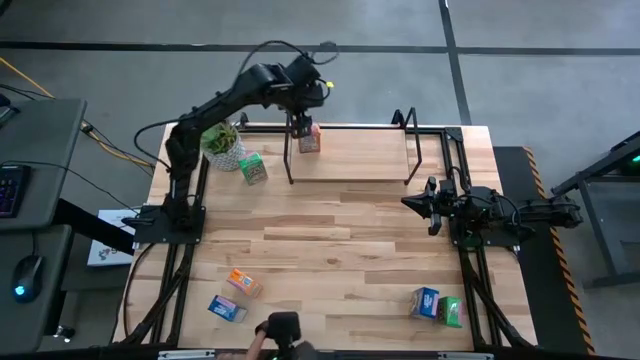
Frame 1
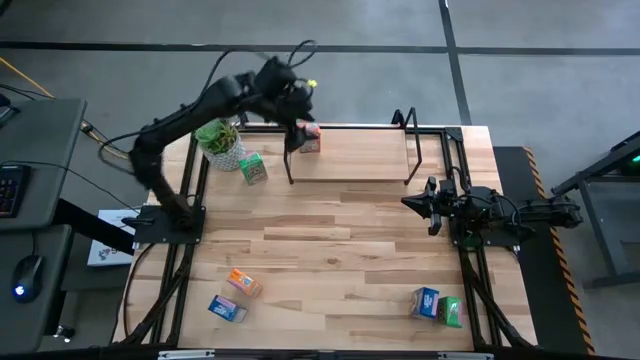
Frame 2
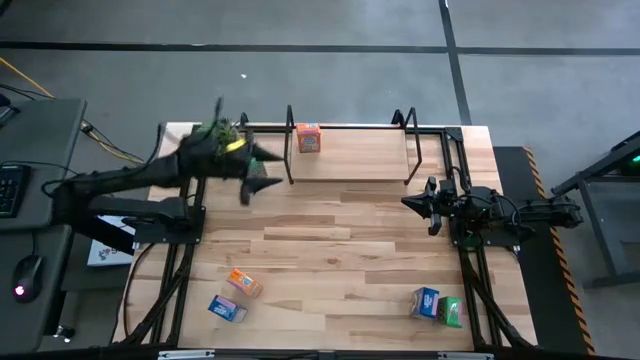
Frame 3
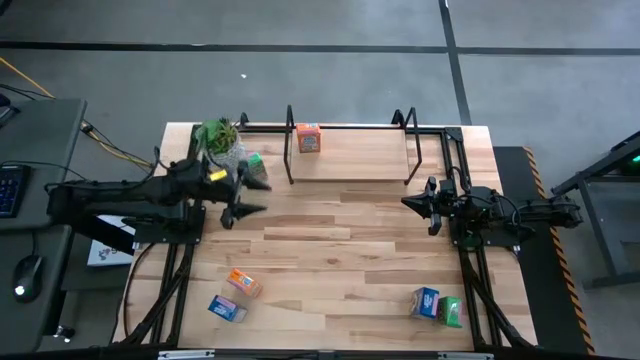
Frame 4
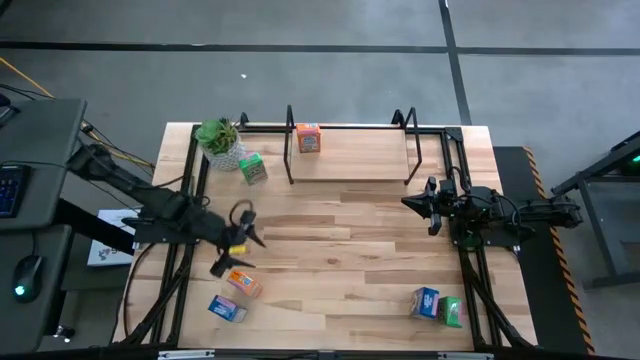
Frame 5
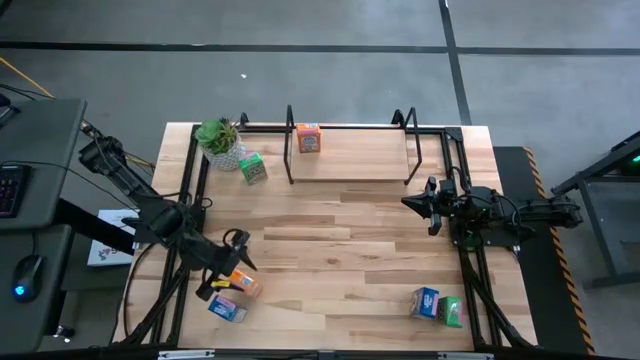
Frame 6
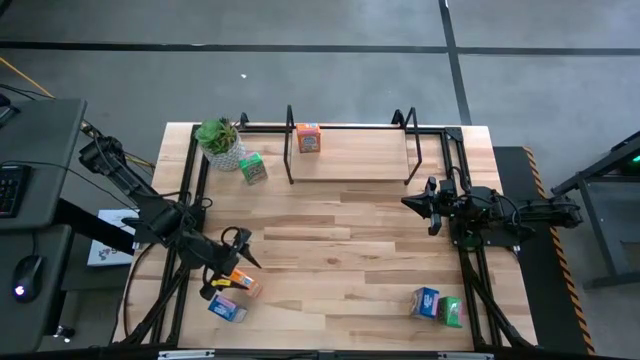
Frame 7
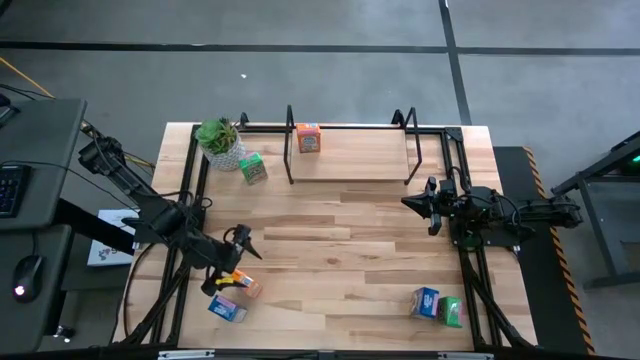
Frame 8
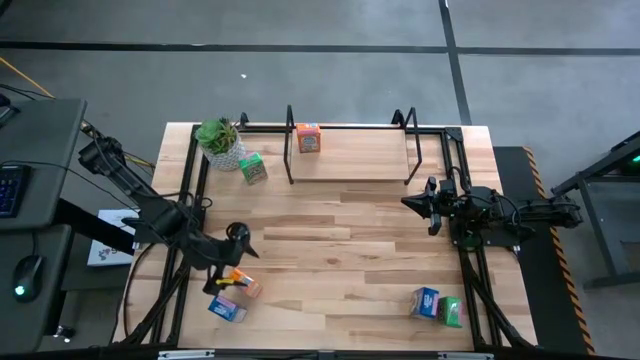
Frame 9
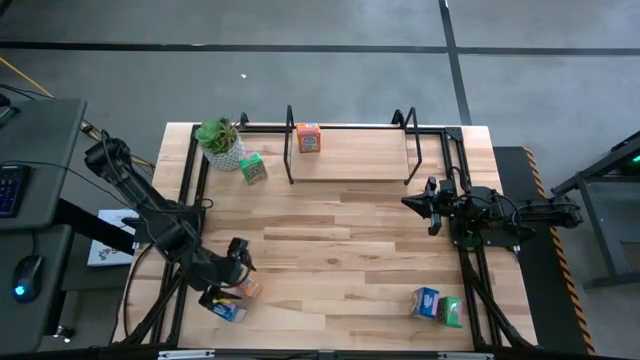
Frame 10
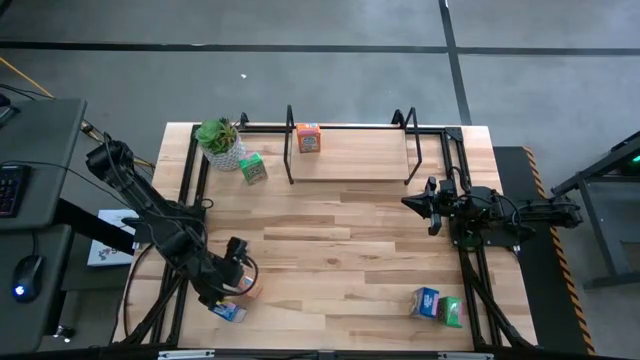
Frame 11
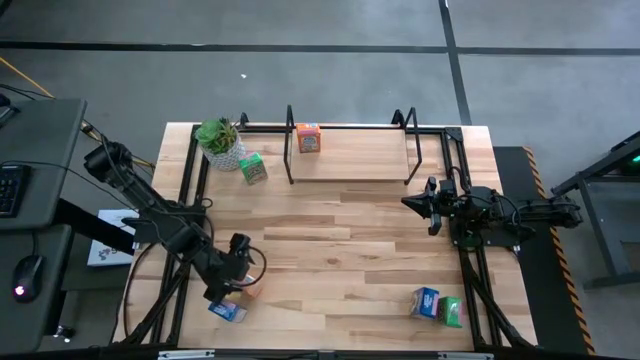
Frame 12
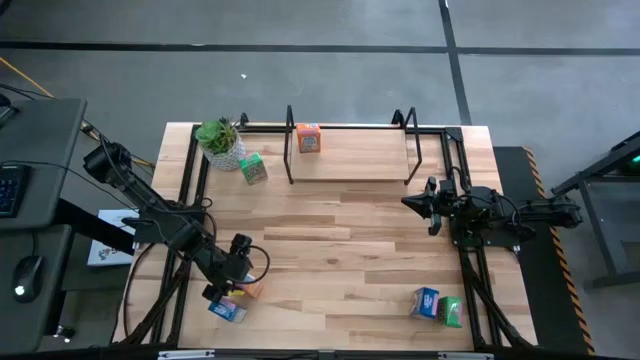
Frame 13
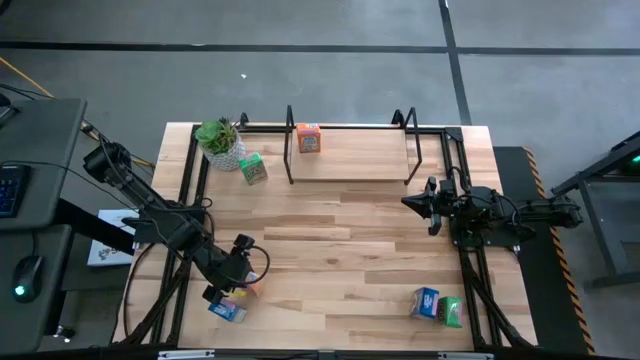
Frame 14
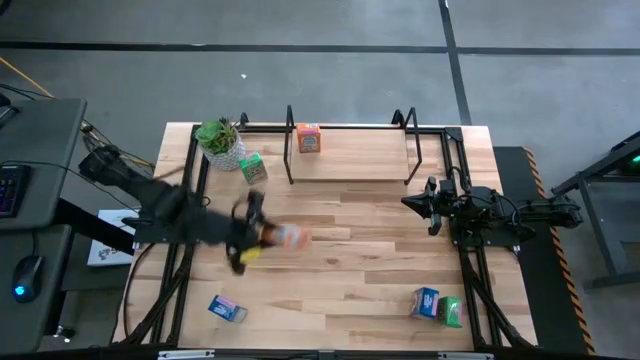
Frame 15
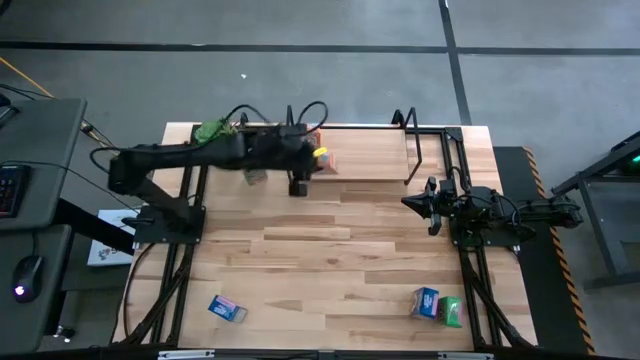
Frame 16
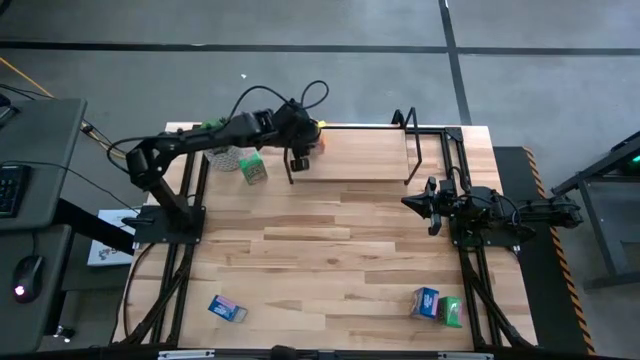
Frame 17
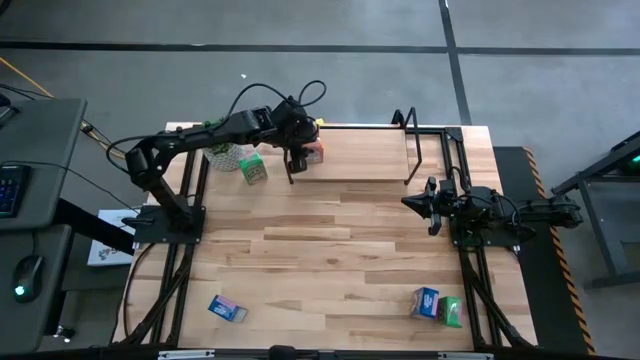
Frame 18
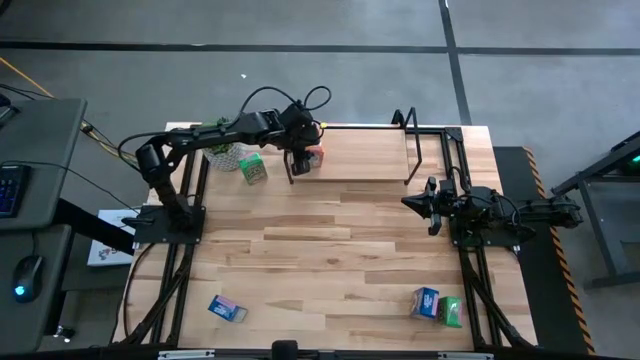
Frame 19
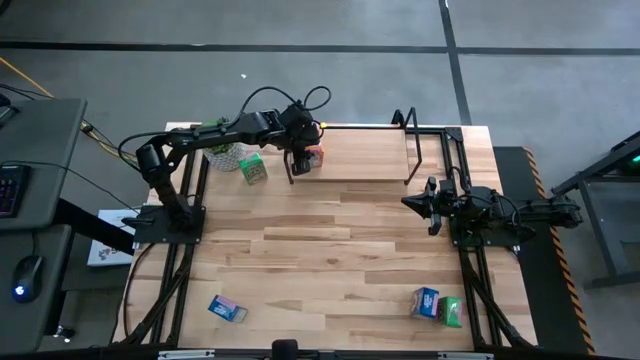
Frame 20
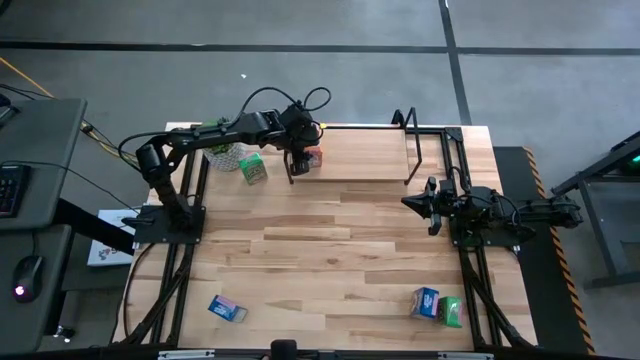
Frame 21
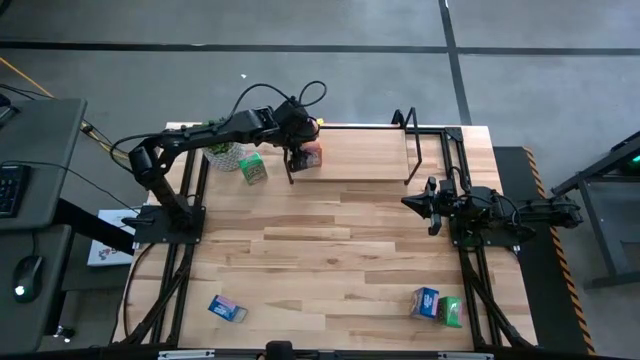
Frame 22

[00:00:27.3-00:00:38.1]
Task: Stack cereal on shelf
Put the orange cereal box on the shelf aligned with the other orange cereal box

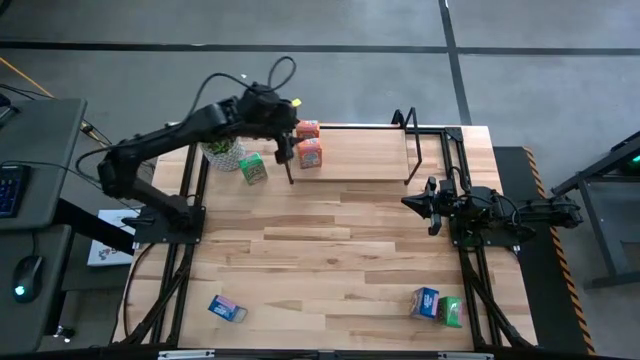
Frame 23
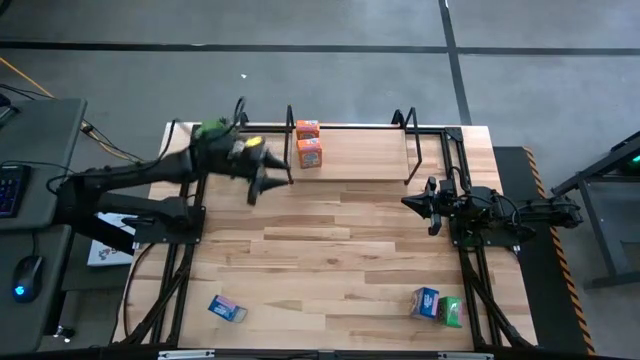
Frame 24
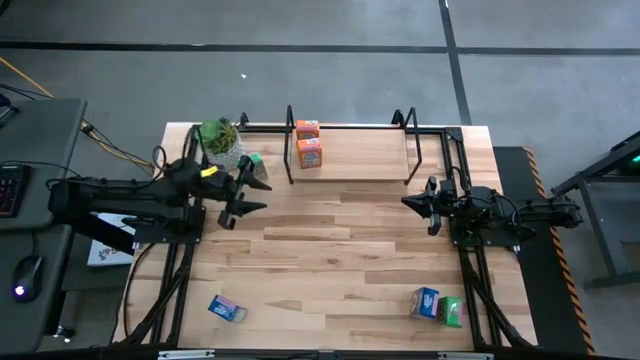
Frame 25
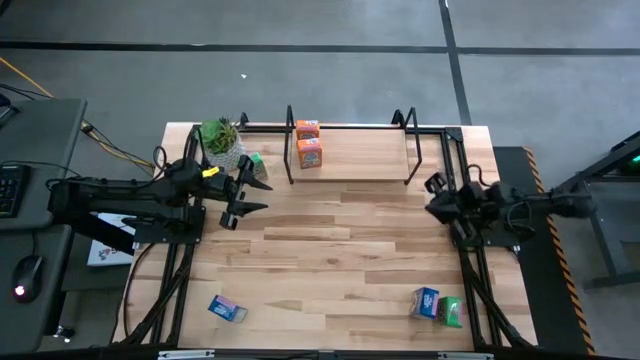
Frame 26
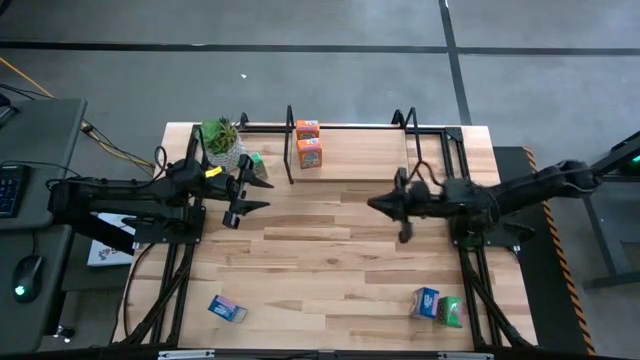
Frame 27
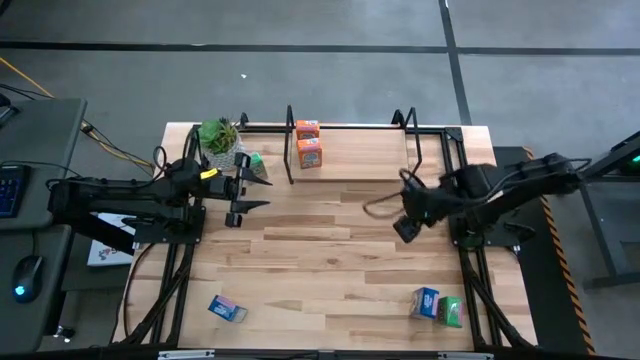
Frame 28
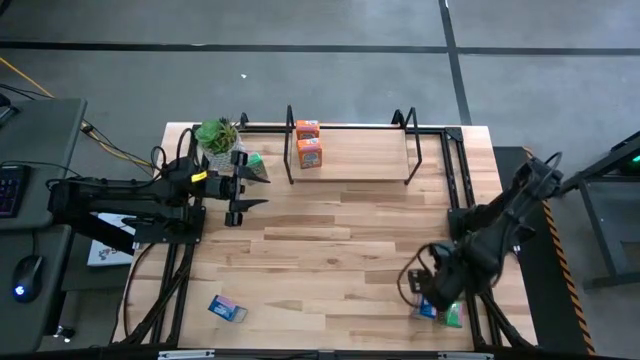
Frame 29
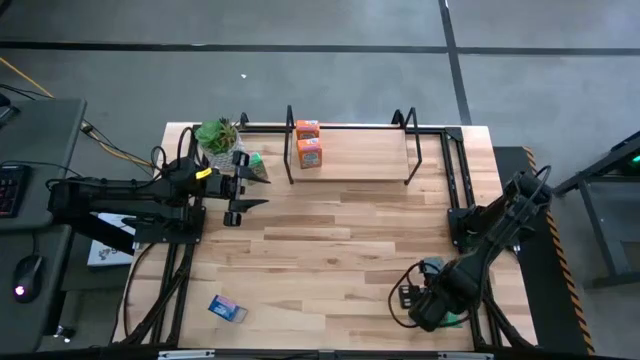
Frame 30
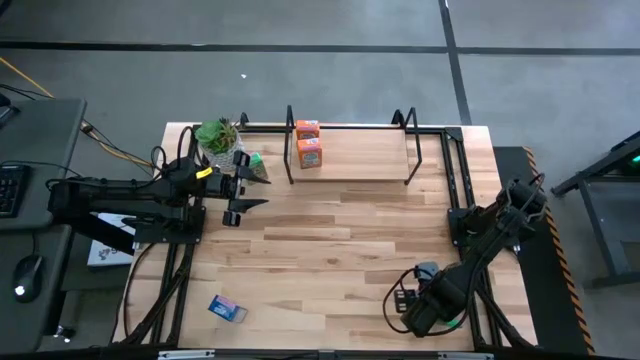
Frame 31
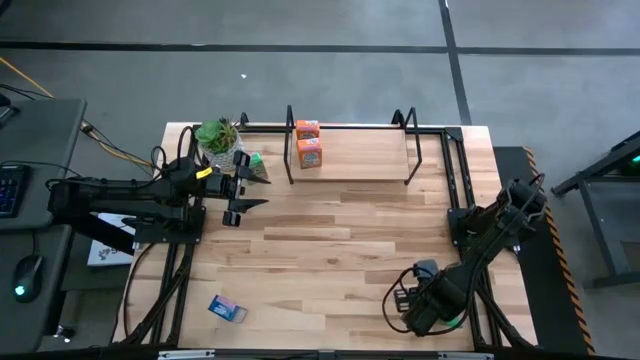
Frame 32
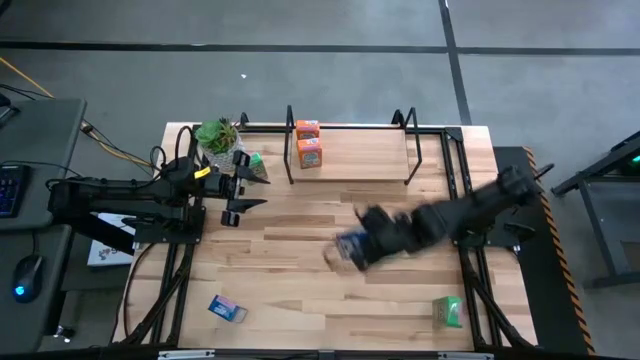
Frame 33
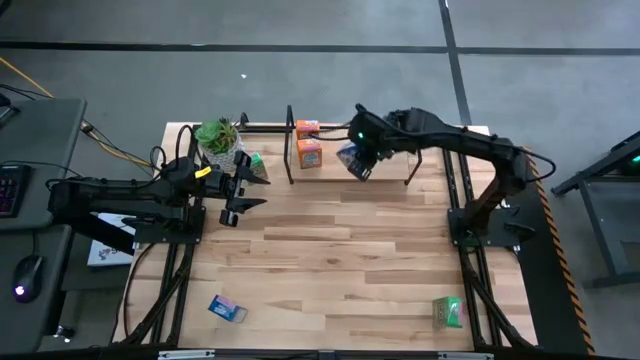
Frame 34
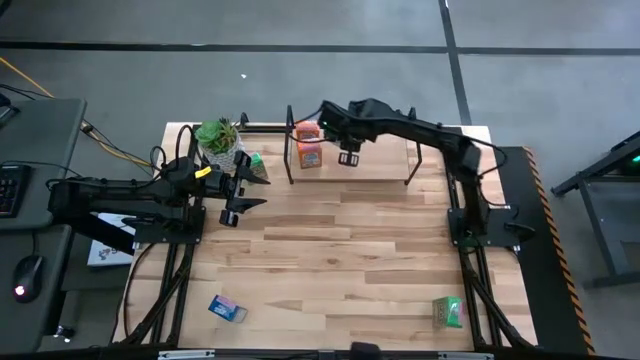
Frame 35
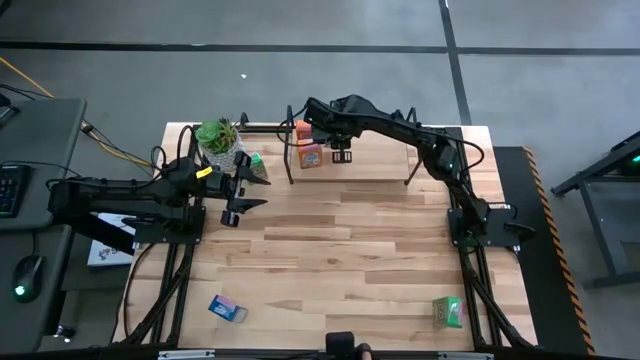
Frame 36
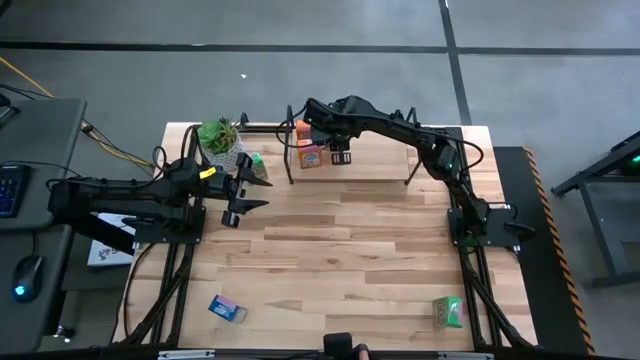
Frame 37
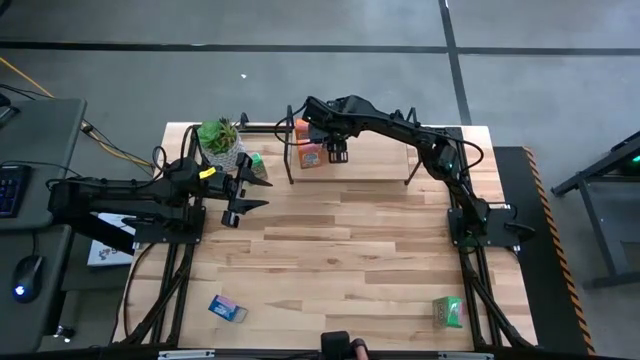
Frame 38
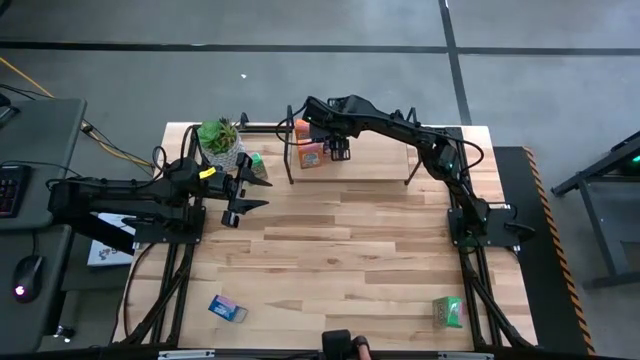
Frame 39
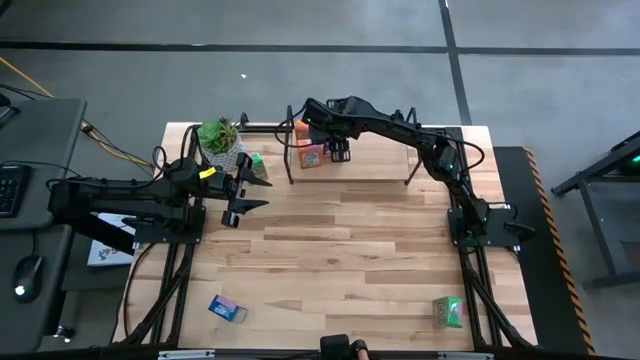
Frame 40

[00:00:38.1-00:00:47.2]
Put the right blue cereal box on the shelf

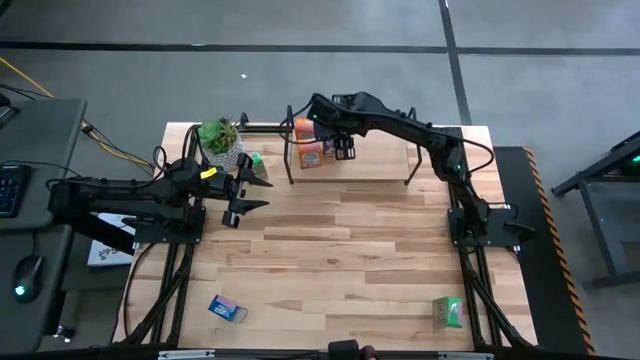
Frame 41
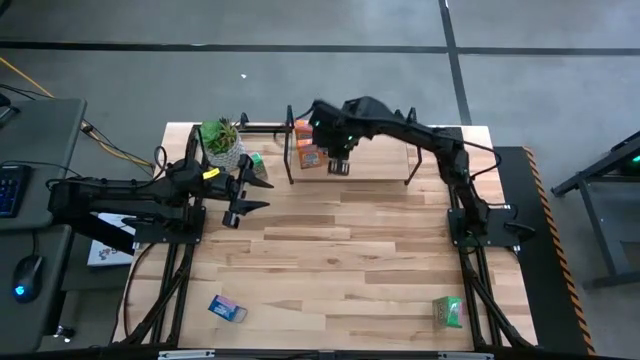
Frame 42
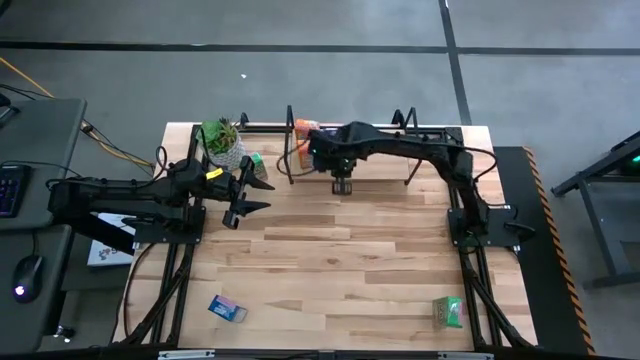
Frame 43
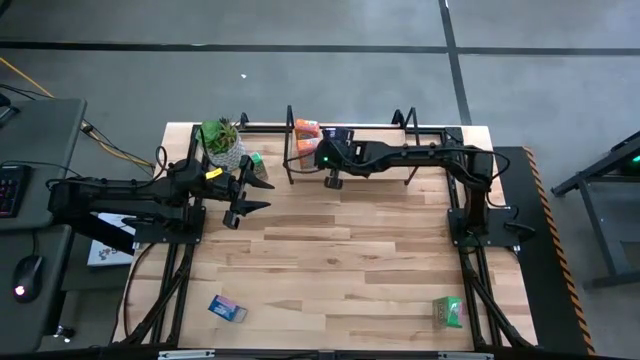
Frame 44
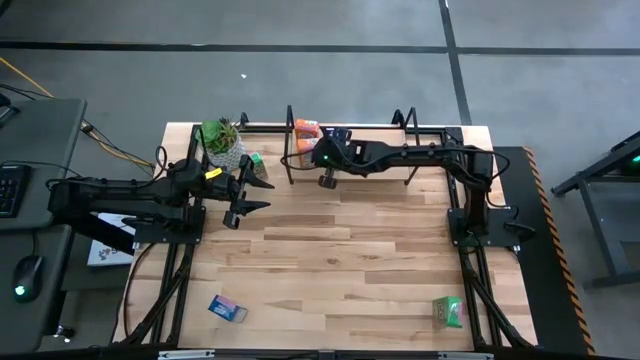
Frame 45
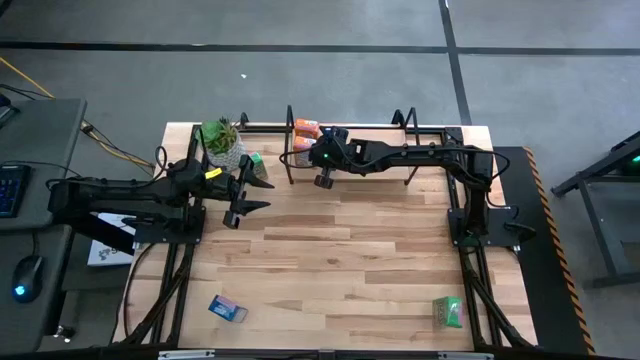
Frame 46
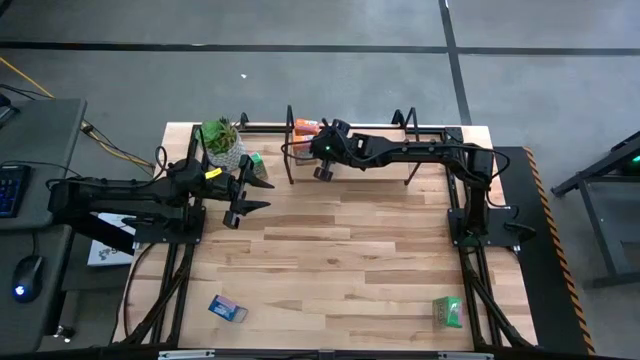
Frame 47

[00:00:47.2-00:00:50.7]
Adjust the orange cereal box on the shelf
